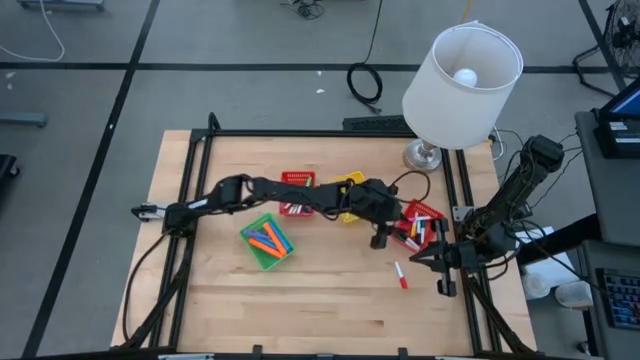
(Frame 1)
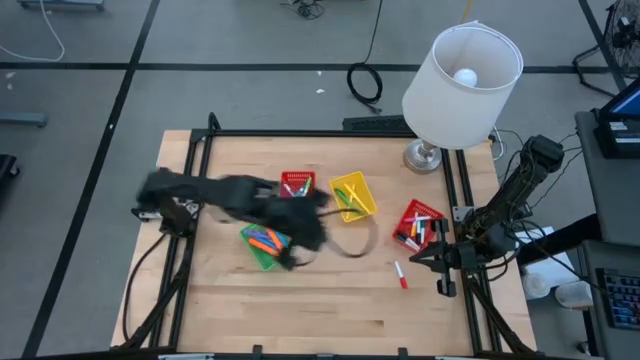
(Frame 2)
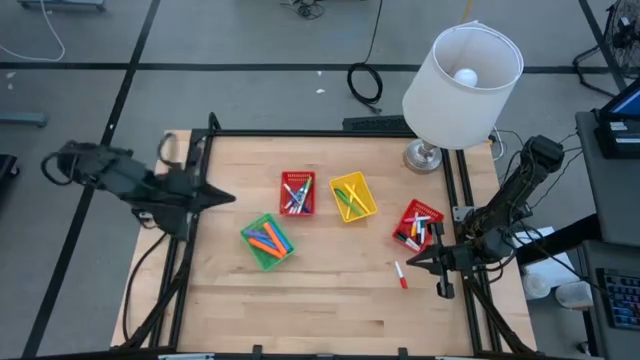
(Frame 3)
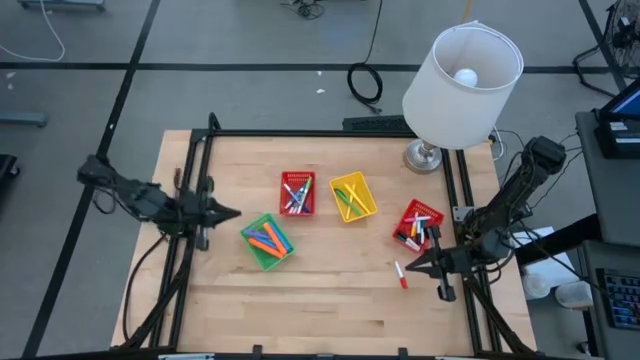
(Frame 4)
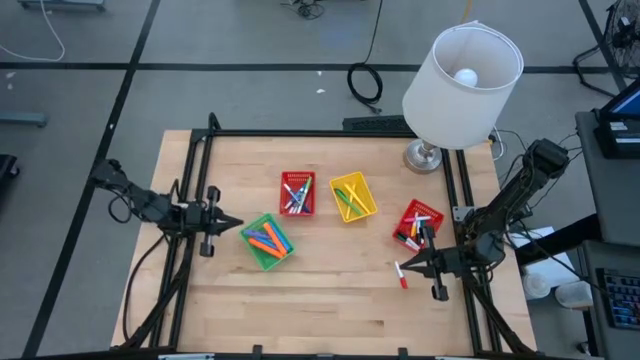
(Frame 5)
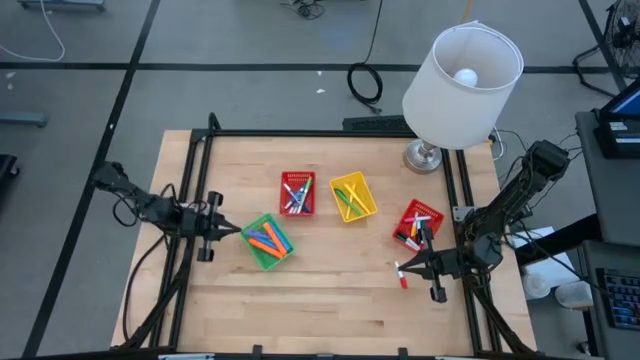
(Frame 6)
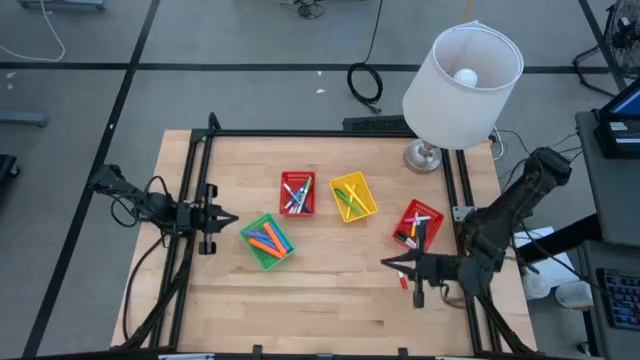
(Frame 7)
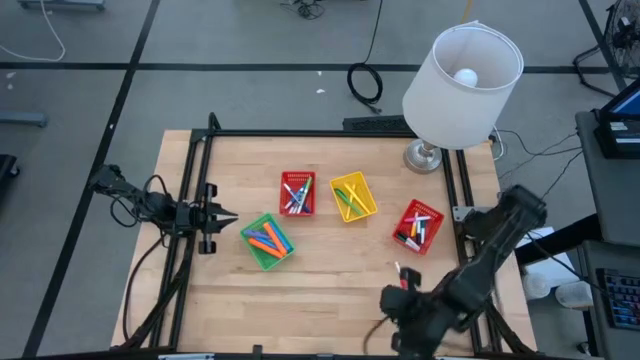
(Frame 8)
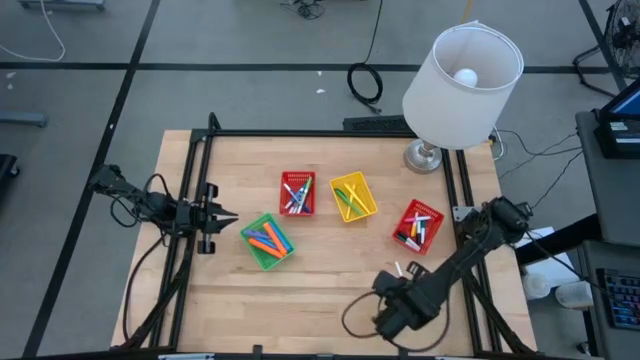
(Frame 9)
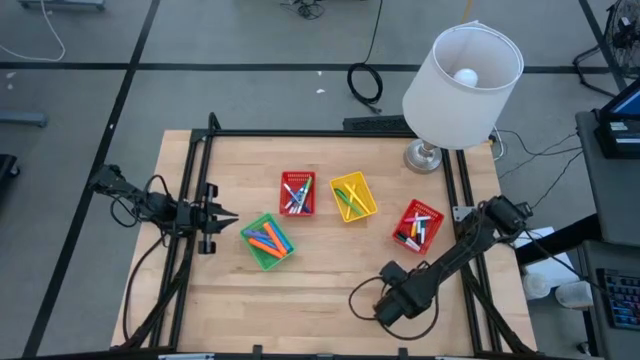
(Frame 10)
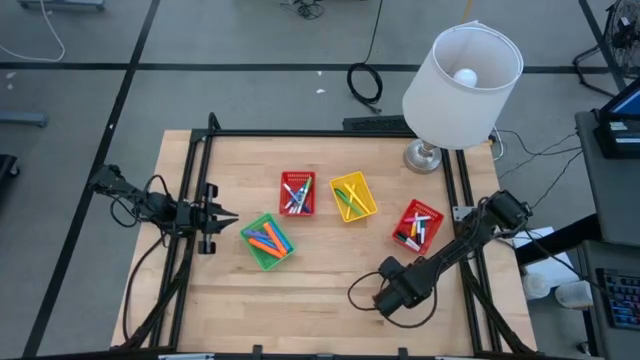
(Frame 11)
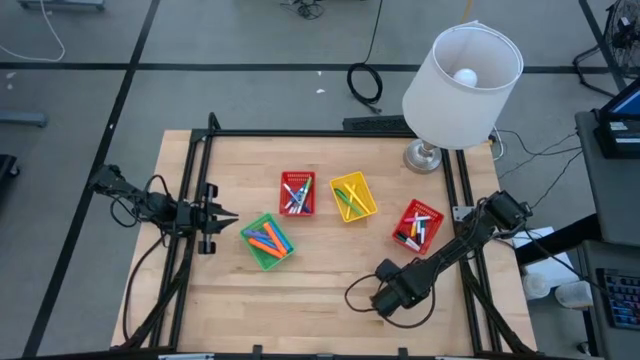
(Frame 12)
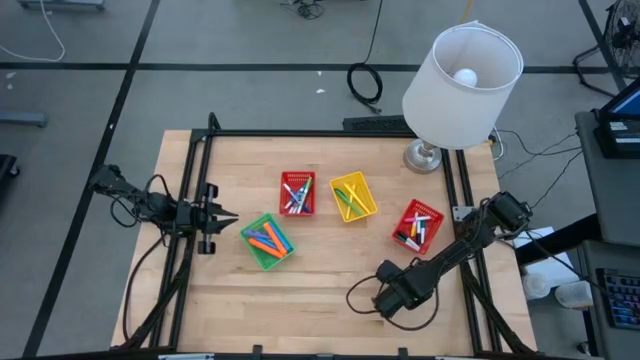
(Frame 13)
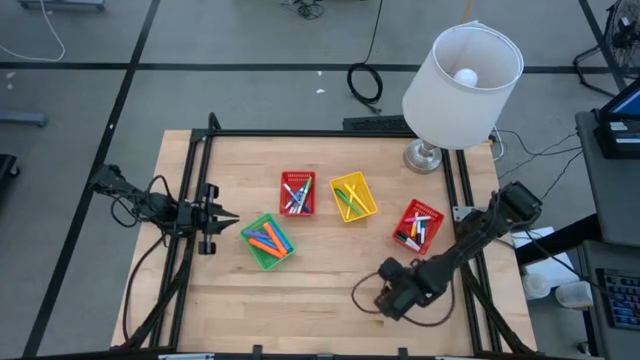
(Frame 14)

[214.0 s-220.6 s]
Task: Pick & Place Markers
Put the red highlighter into the right red bin

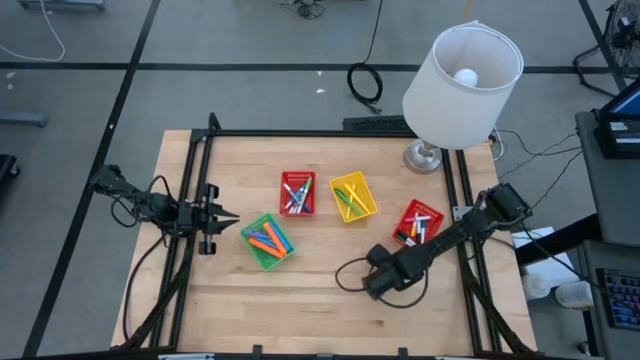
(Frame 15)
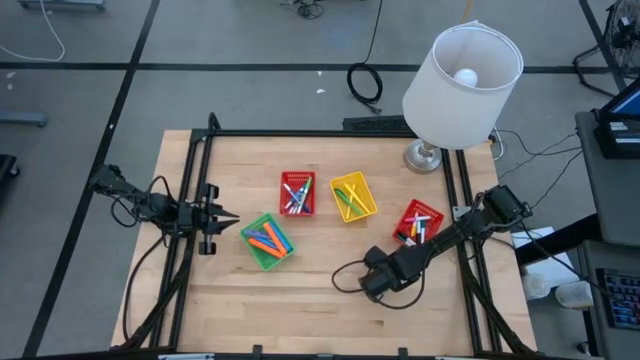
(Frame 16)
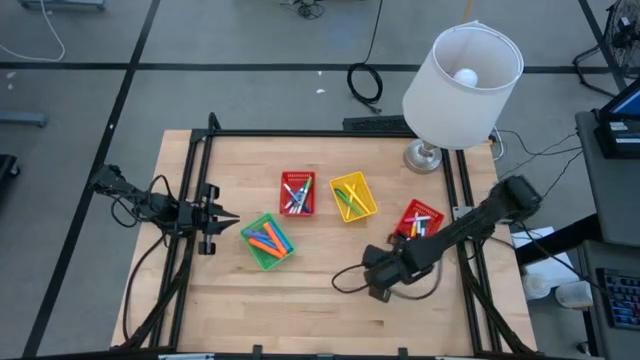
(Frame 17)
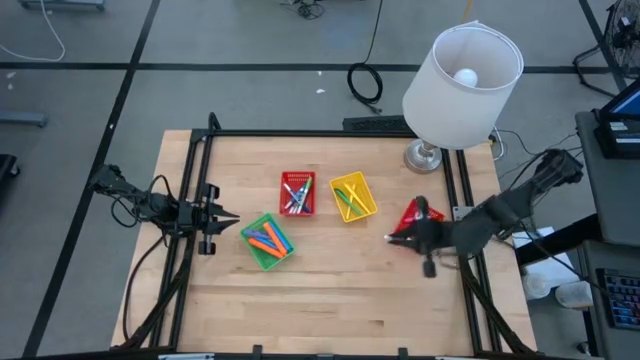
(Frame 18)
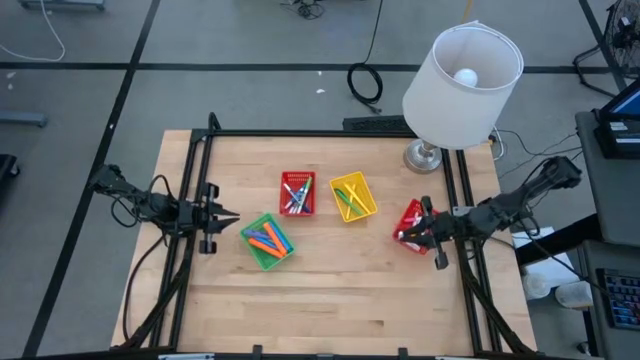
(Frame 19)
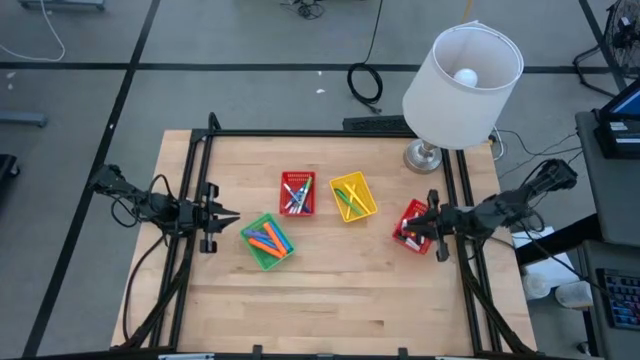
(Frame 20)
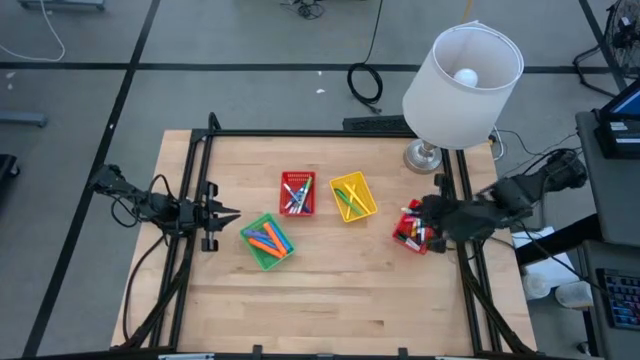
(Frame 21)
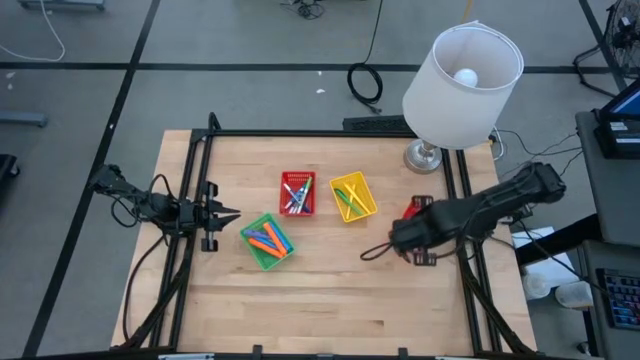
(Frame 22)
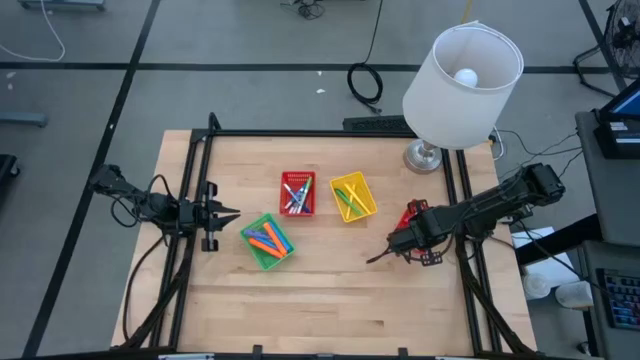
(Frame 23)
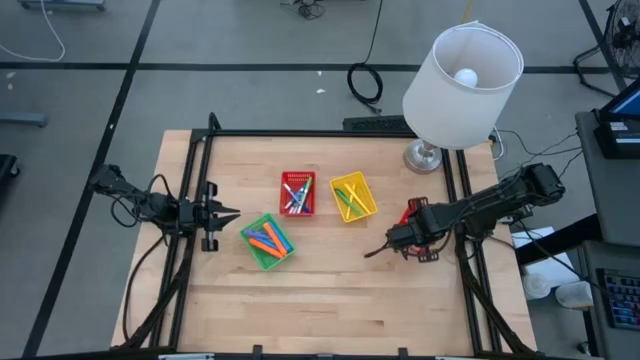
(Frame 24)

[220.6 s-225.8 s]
Put the red highlighter into the right red bin
